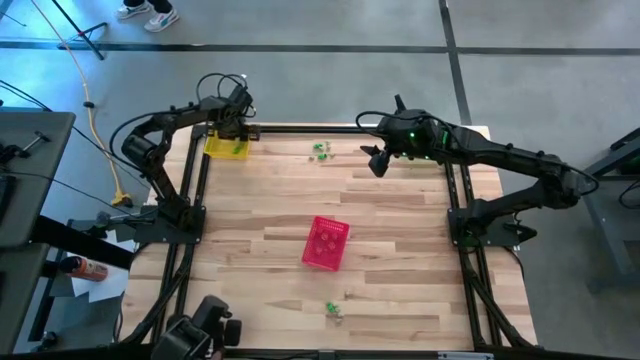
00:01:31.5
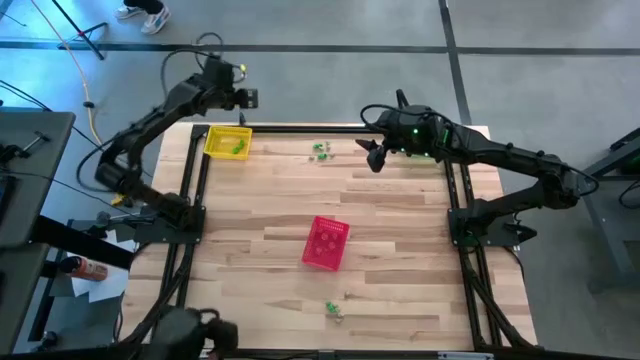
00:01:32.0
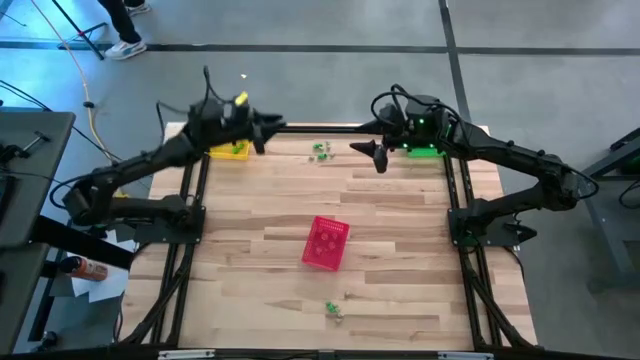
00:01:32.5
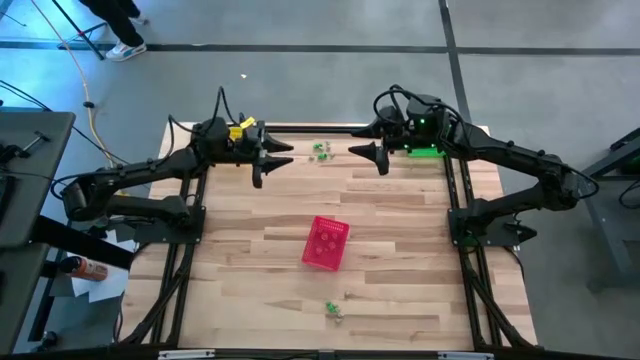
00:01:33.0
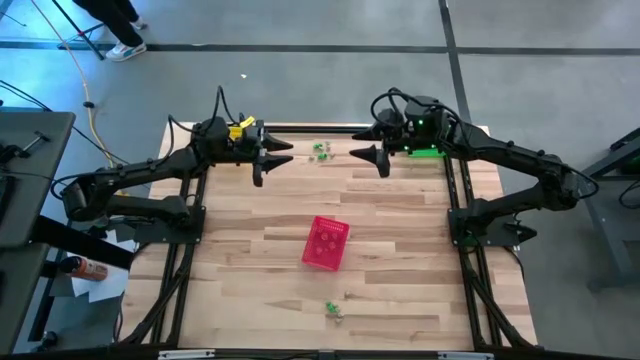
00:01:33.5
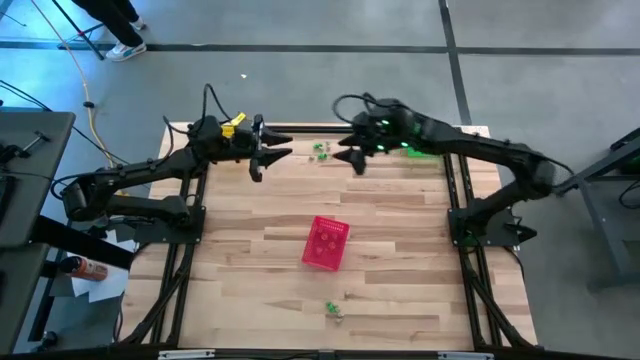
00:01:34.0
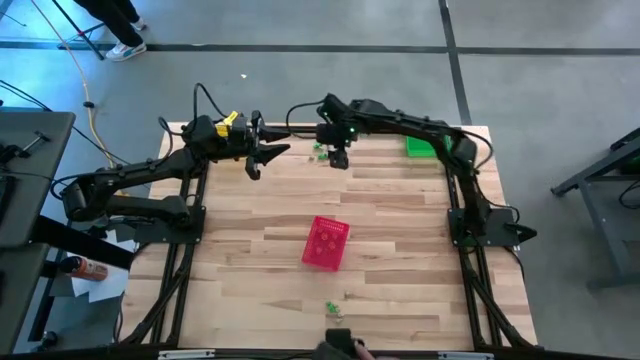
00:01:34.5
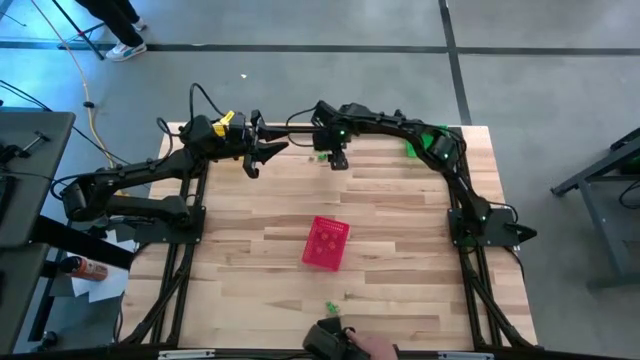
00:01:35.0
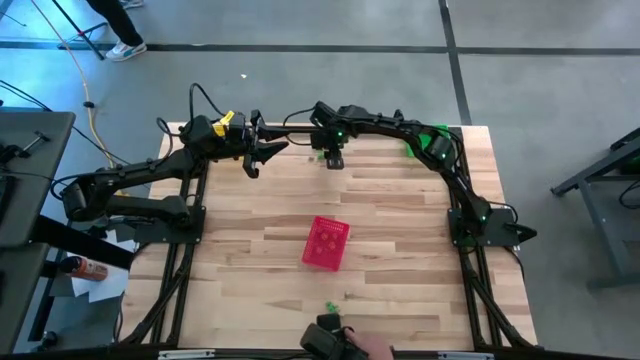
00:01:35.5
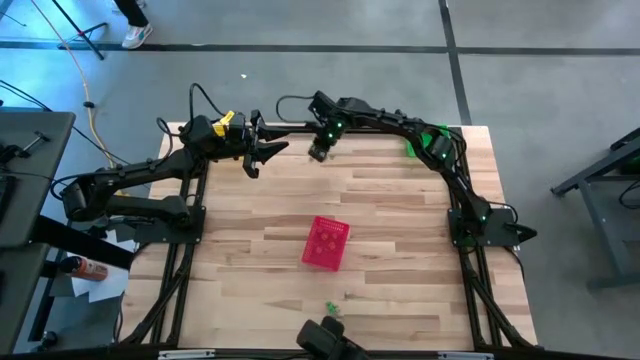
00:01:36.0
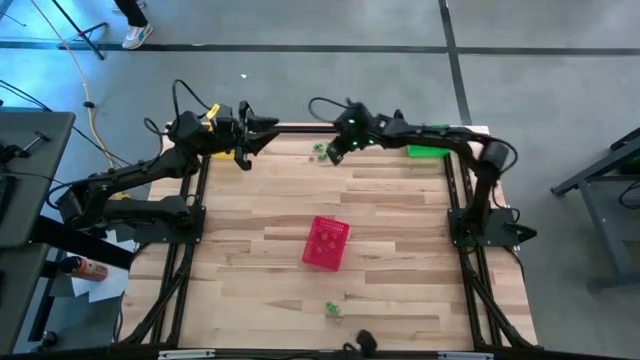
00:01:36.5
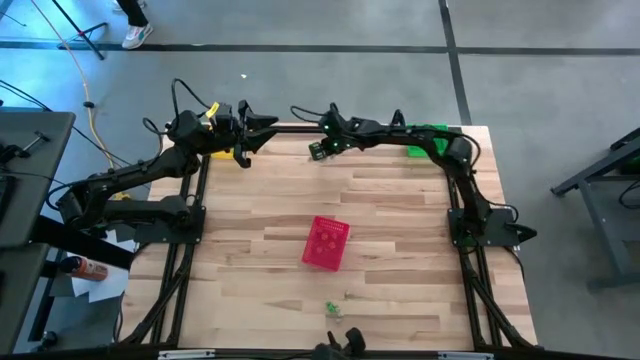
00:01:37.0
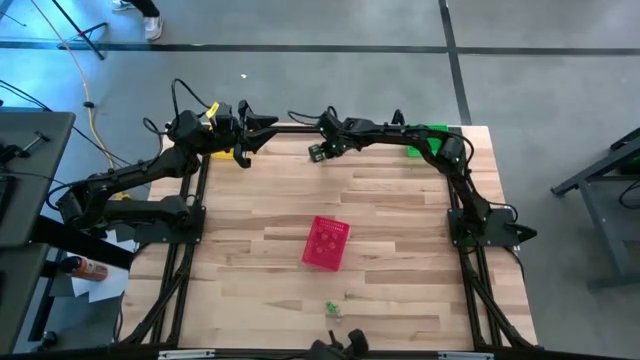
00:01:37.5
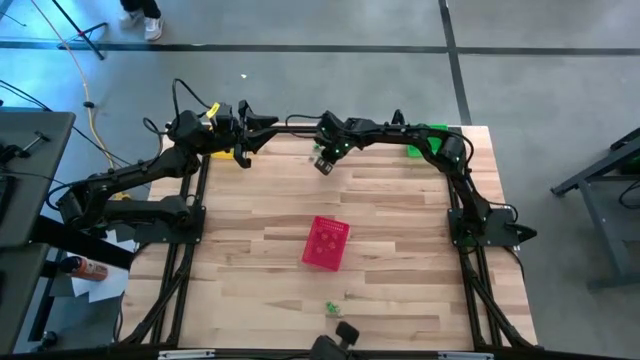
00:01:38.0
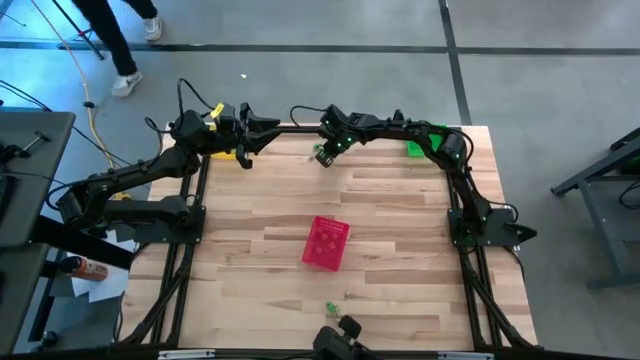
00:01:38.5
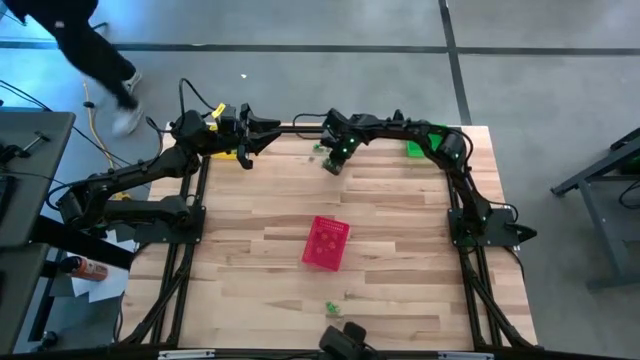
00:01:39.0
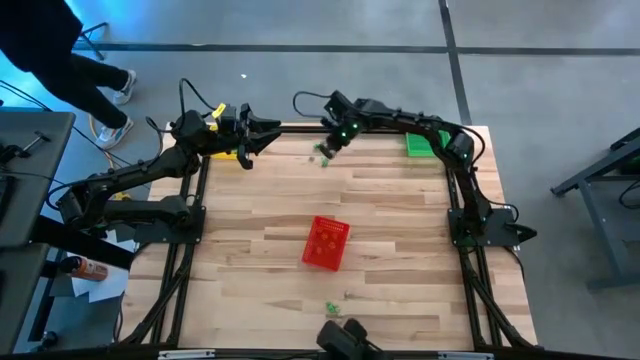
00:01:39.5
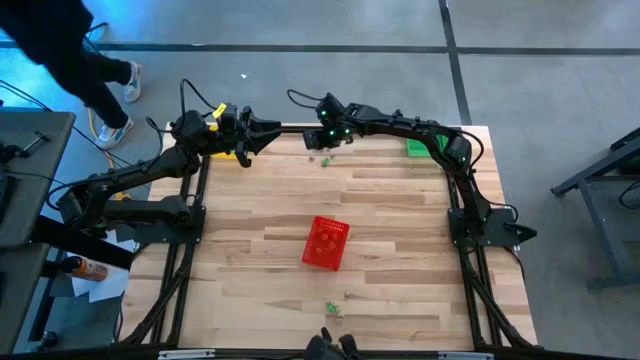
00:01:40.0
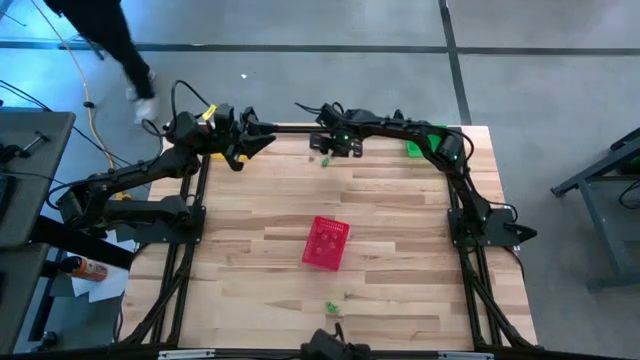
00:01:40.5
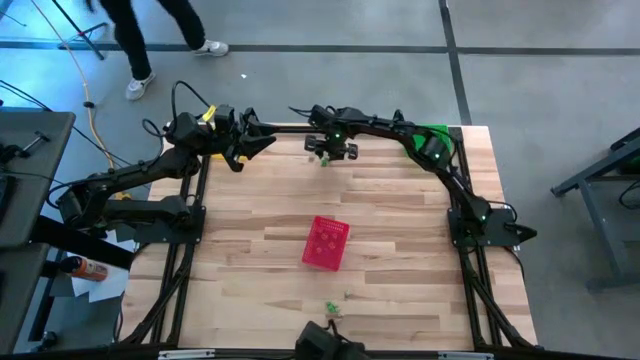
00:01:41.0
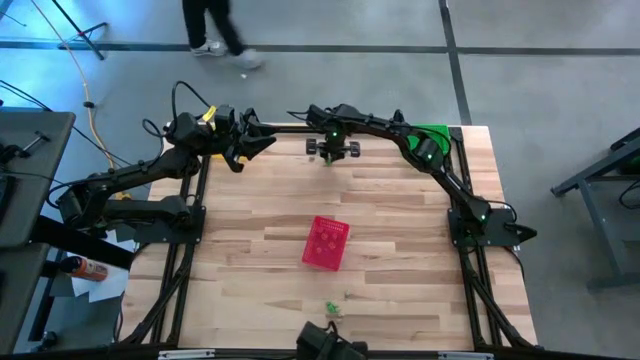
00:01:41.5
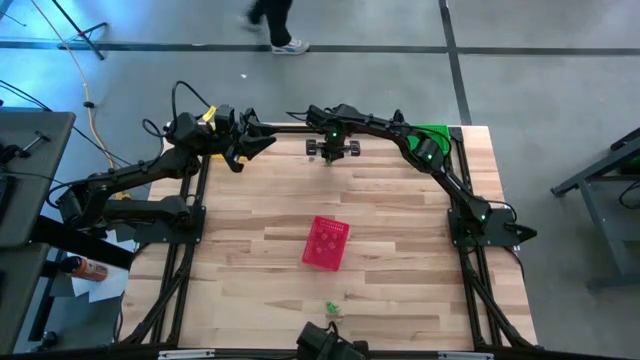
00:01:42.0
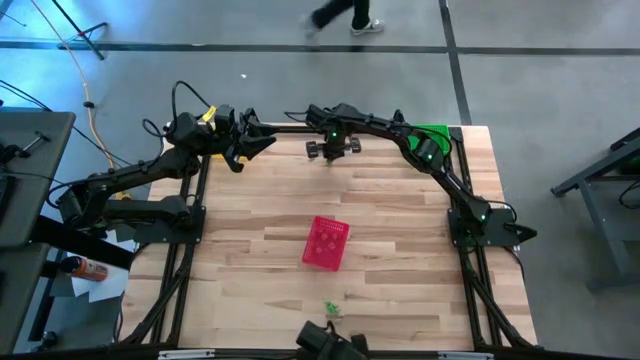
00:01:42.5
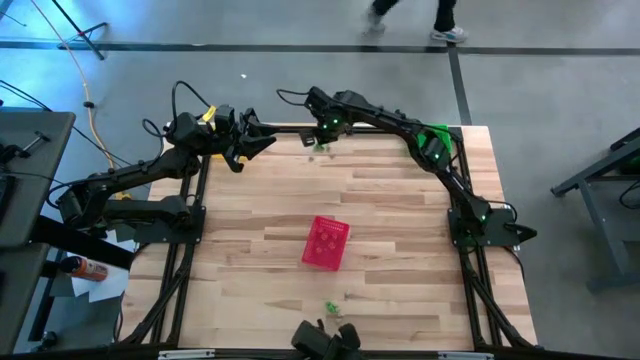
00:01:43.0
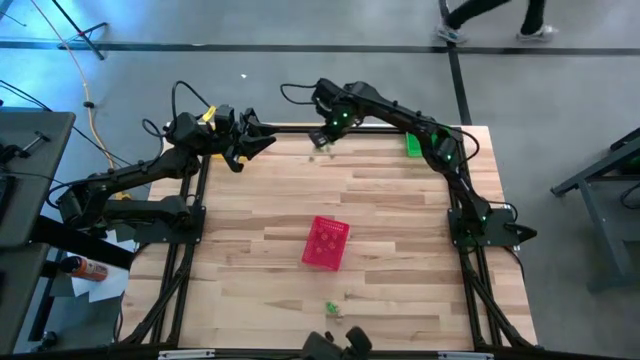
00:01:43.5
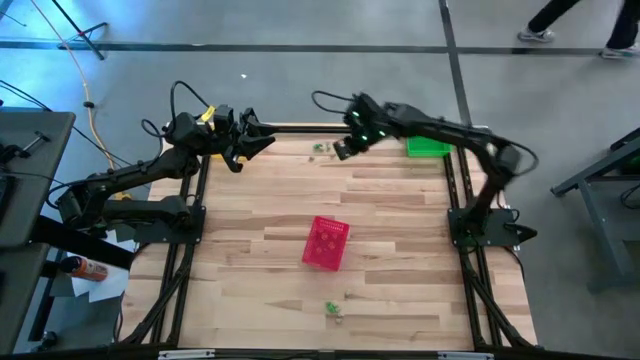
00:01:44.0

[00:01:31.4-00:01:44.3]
Task: Sort Halloween decoration
Put the green skeleton toy into the yellow bin

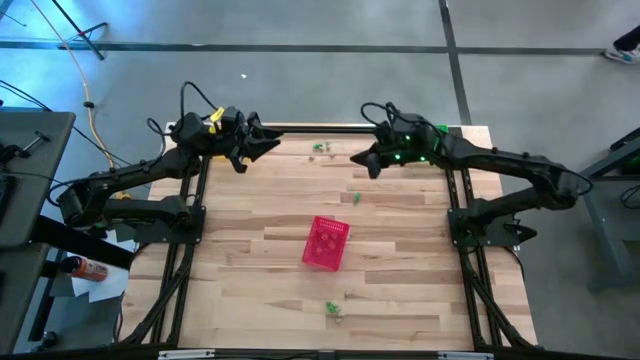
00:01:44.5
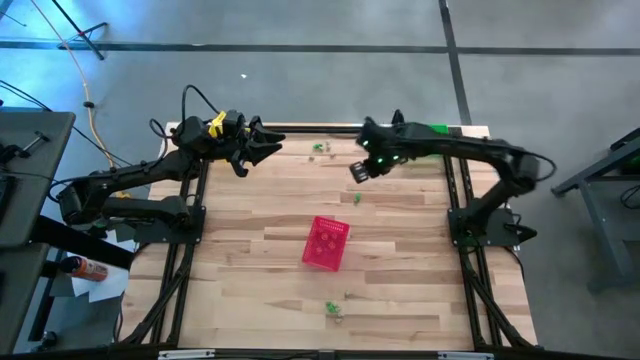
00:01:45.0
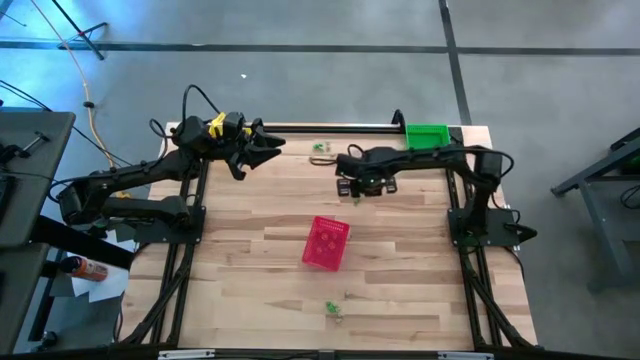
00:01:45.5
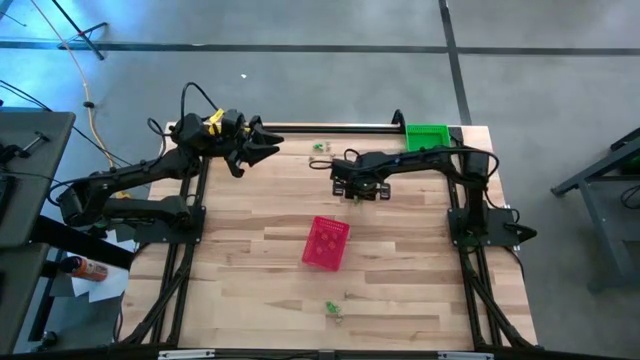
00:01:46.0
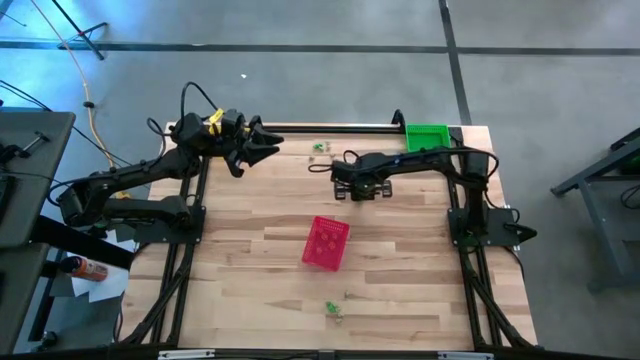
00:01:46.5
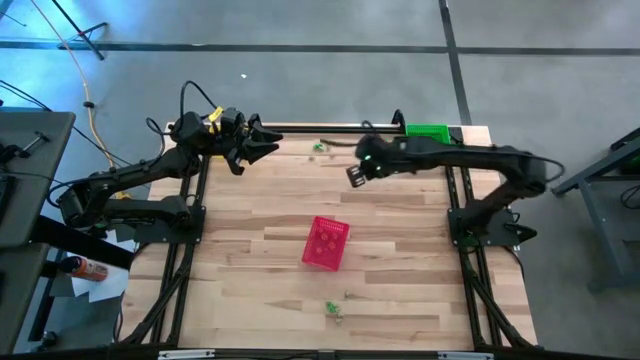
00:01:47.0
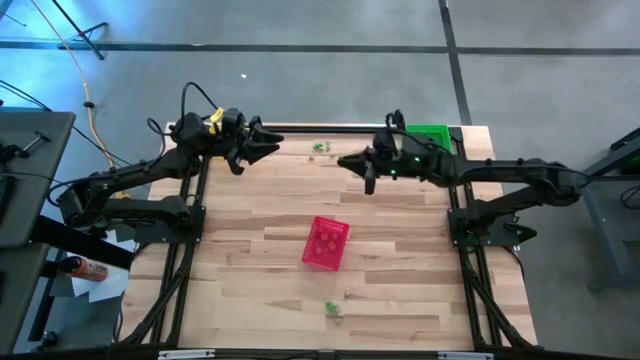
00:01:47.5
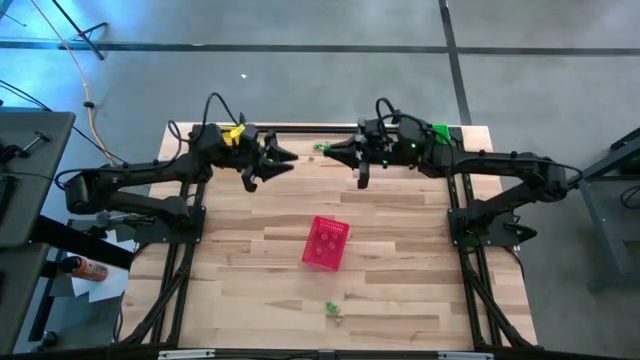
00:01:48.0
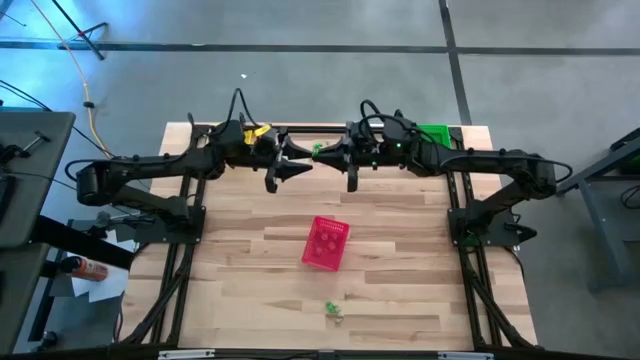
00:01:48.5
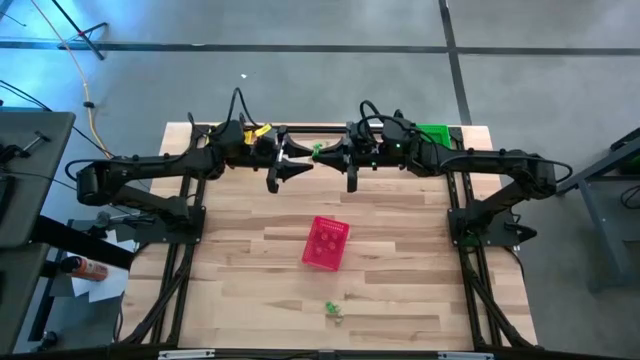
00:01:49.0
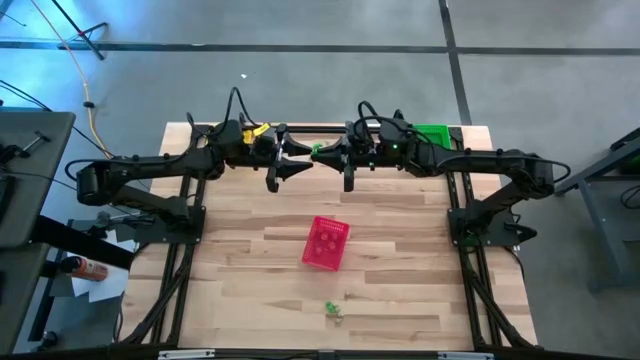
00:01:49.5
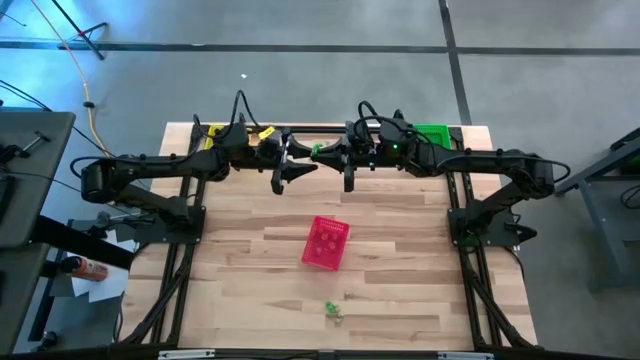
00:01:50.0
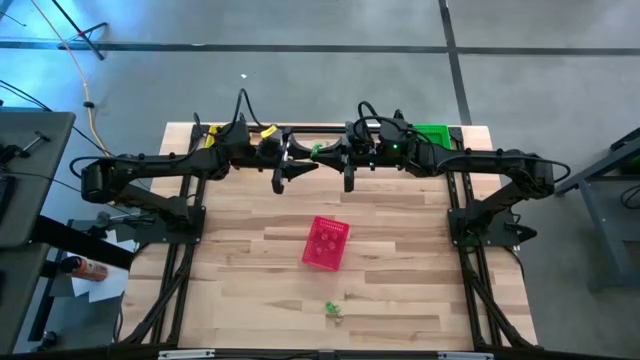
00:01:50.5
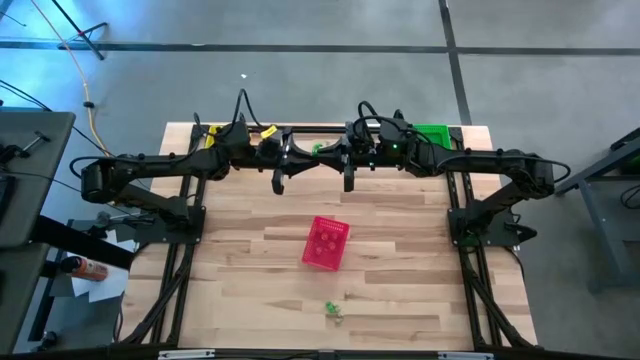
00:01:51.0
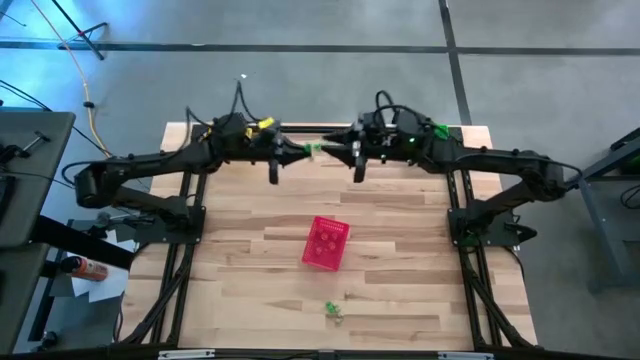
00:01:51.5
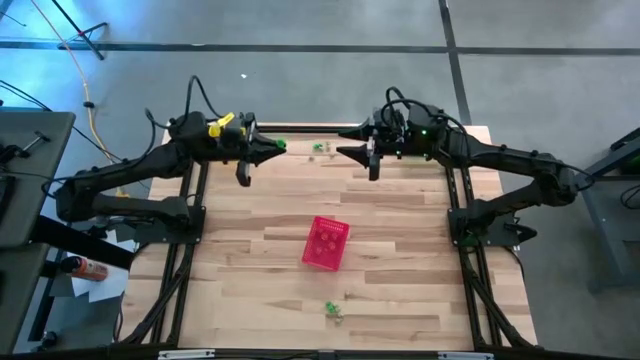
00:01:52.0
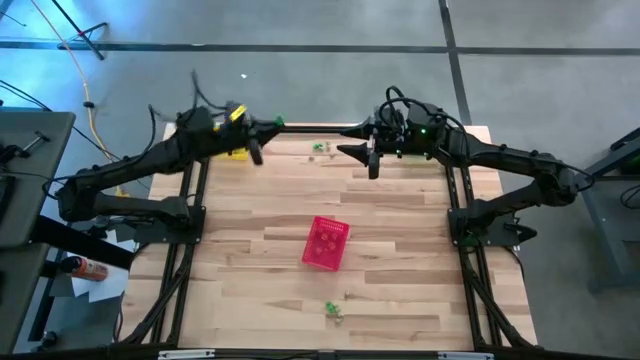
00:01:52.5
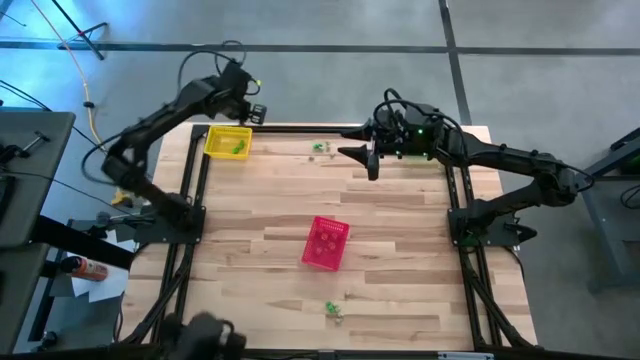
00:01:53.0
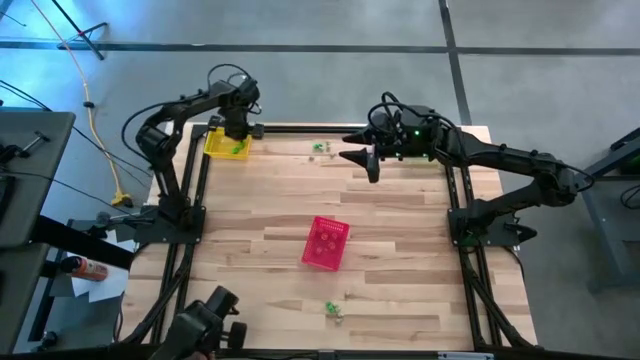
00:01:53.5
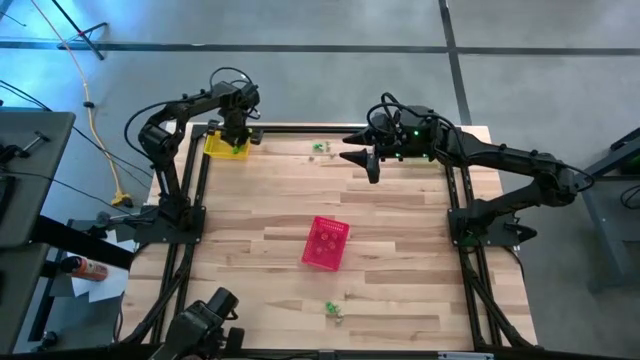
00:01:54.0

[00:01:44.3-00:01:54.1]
Put the green skeleton toy into the yellow bin
